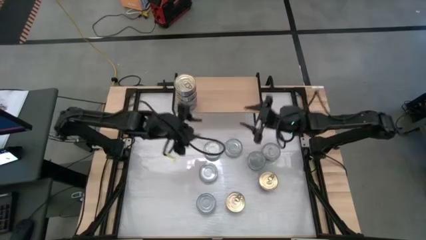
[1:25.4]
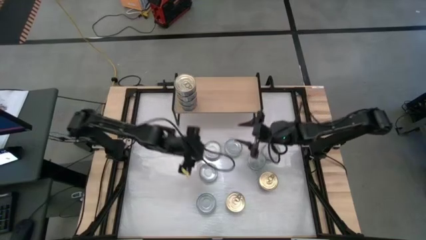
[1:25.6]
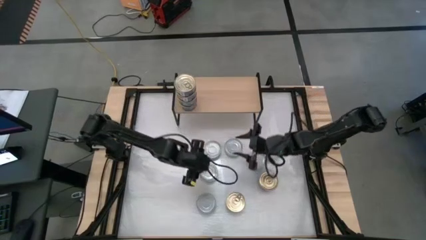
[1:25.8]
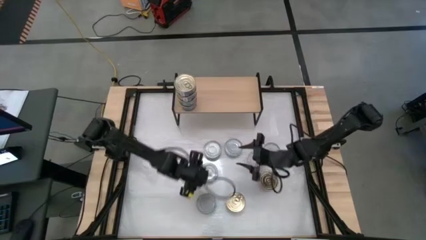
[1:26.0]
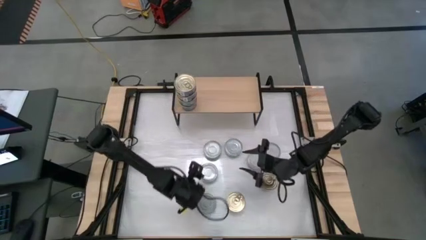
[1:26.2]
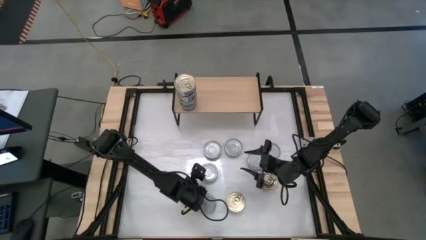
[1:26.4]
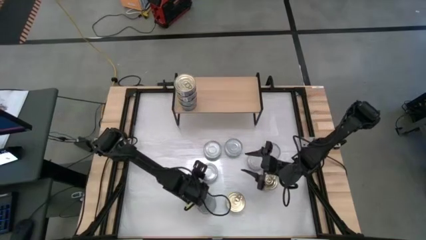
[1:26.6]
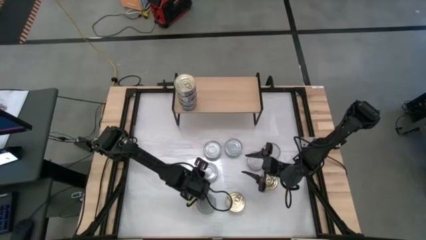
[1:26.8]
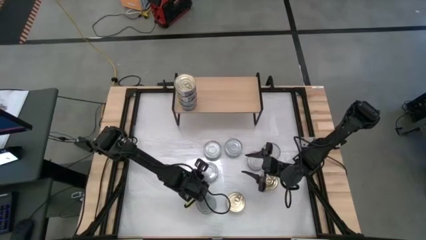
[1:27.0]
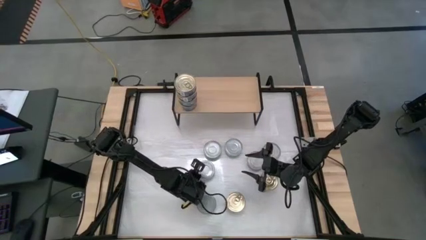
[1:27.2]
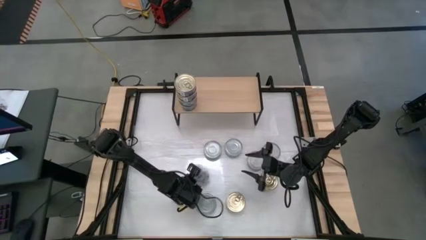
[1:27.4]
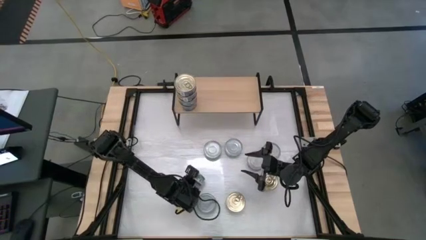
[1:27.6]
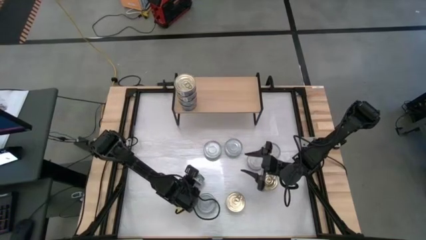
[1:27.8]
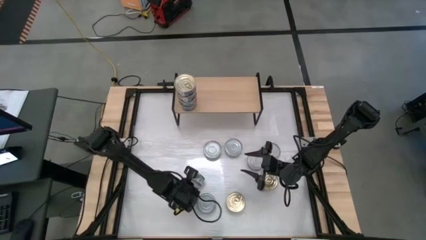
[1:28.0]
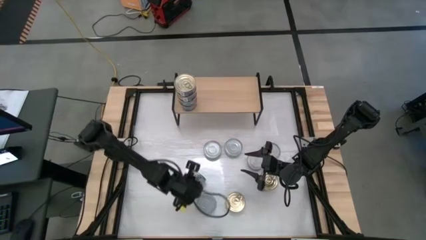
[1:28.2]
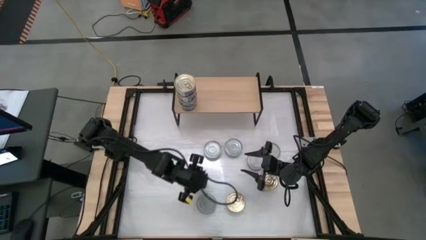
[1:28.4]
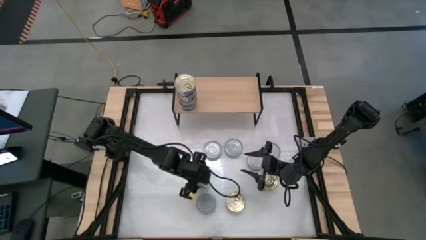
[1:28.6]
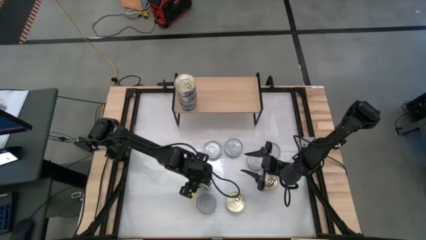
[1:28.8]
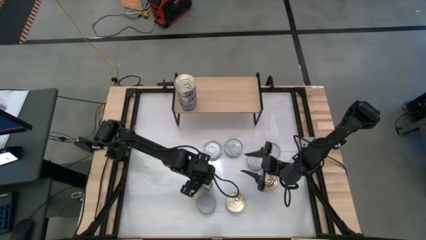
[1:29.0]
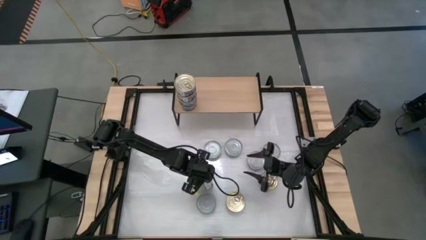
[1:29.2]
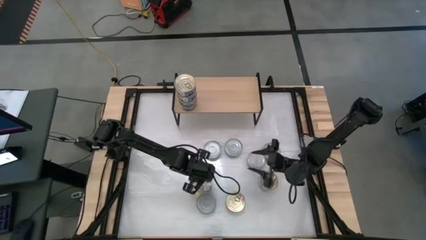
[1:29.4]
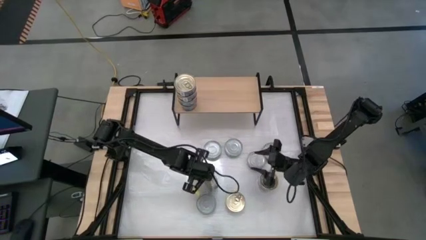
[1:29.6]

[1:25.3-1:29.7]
Task: Stack canned seafood by type on shelf
Put the green tuna can on the shelf

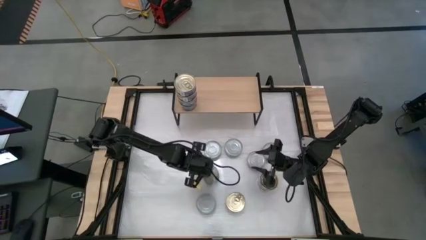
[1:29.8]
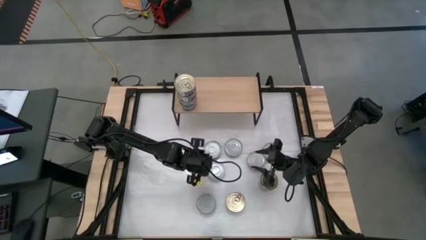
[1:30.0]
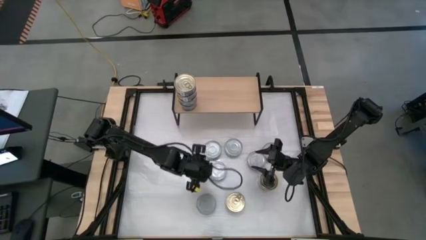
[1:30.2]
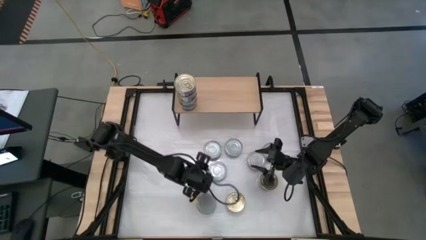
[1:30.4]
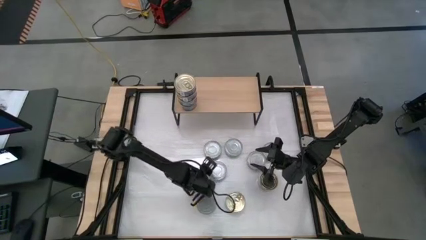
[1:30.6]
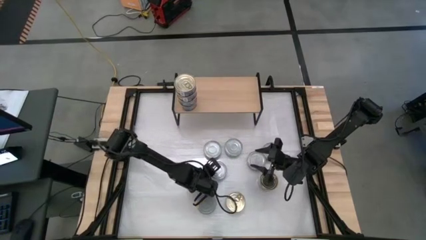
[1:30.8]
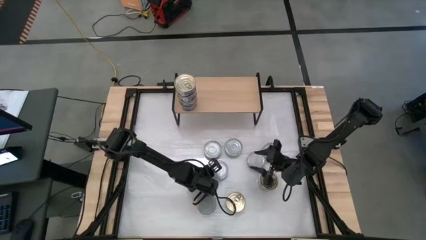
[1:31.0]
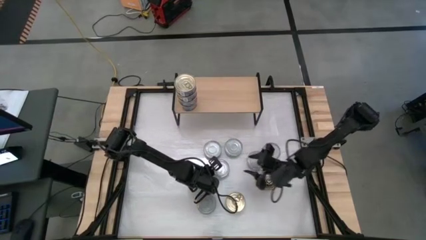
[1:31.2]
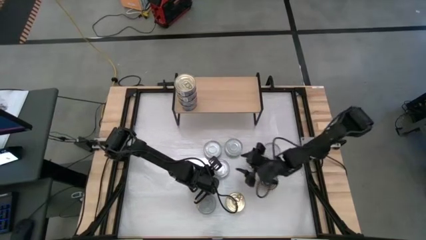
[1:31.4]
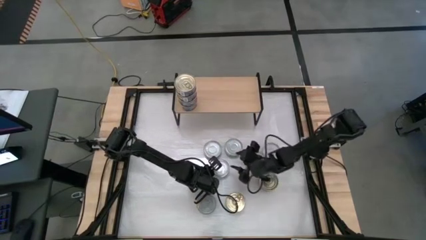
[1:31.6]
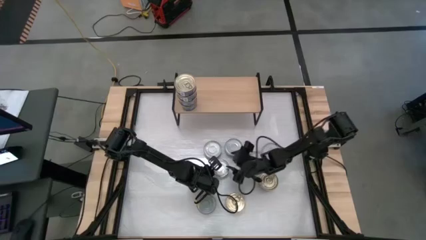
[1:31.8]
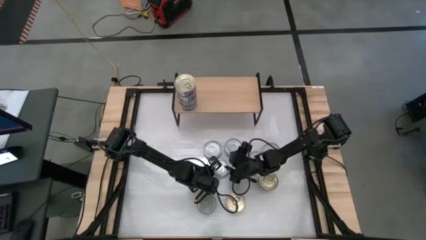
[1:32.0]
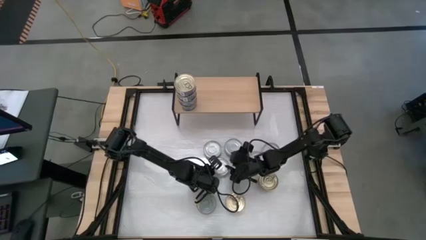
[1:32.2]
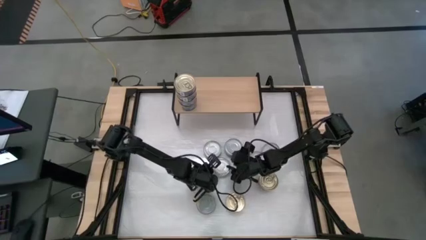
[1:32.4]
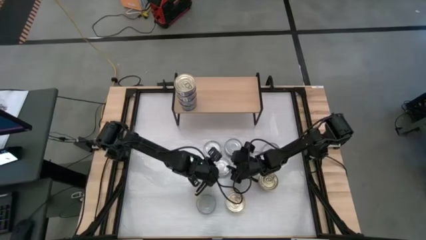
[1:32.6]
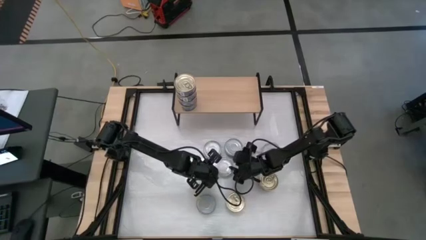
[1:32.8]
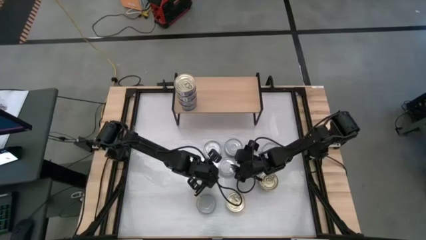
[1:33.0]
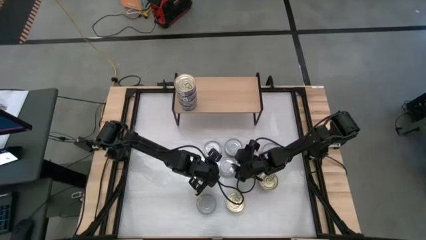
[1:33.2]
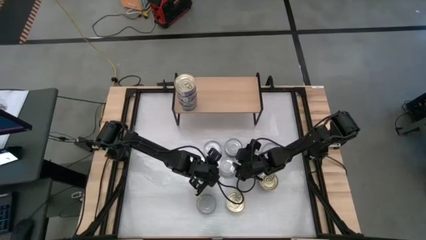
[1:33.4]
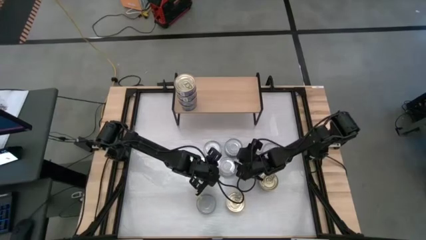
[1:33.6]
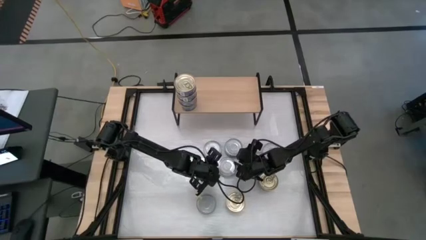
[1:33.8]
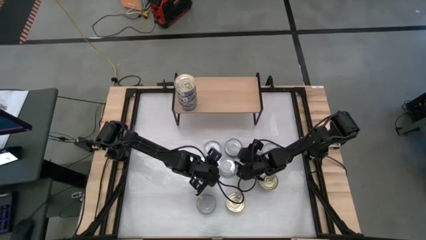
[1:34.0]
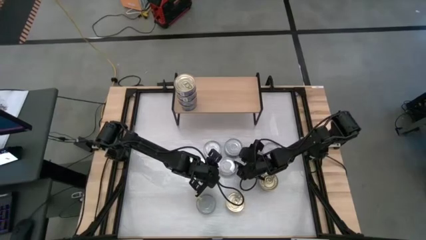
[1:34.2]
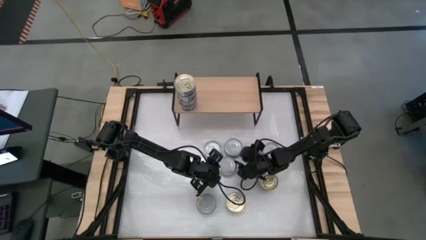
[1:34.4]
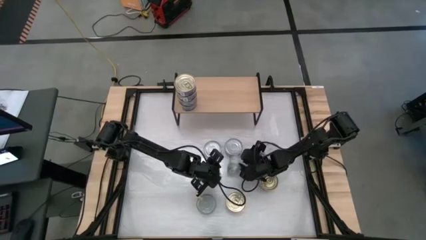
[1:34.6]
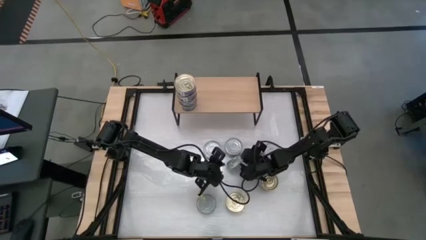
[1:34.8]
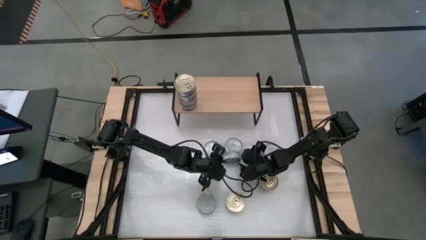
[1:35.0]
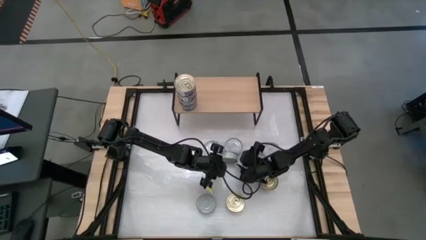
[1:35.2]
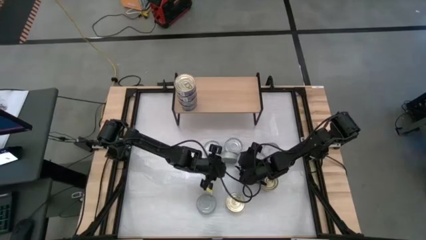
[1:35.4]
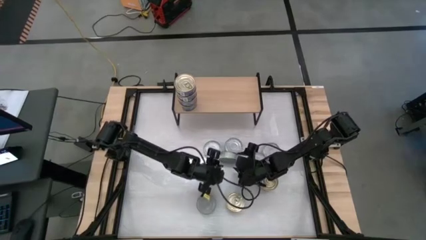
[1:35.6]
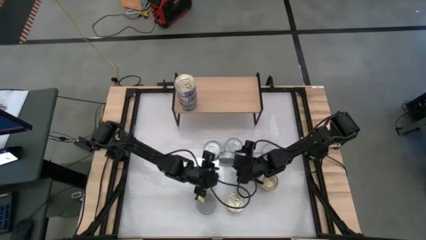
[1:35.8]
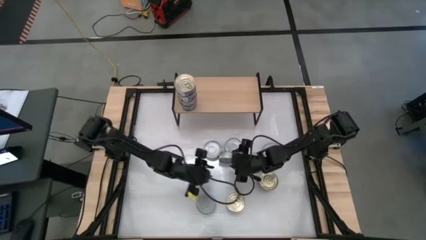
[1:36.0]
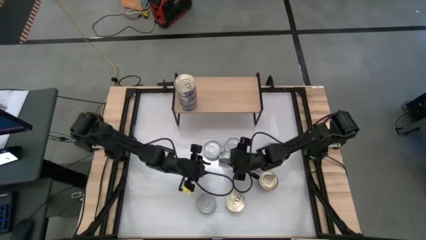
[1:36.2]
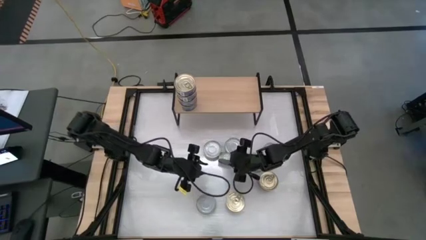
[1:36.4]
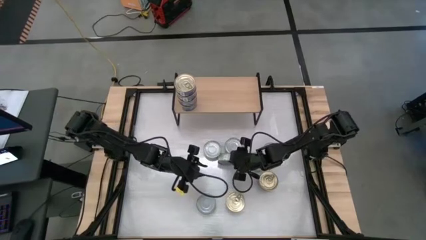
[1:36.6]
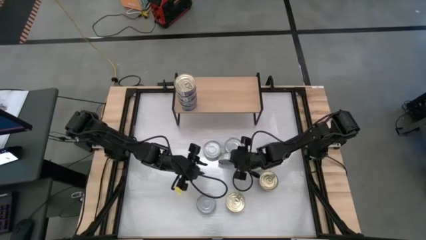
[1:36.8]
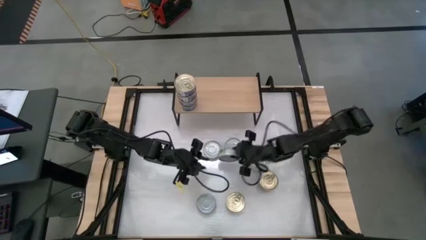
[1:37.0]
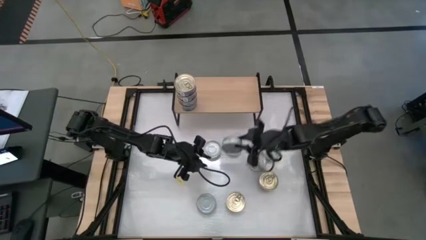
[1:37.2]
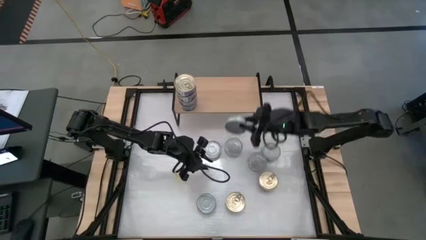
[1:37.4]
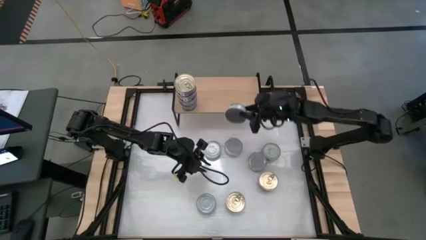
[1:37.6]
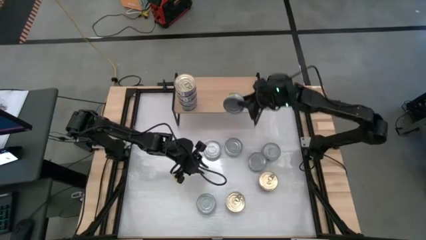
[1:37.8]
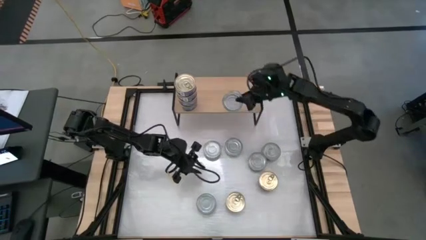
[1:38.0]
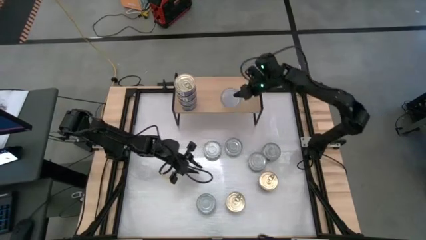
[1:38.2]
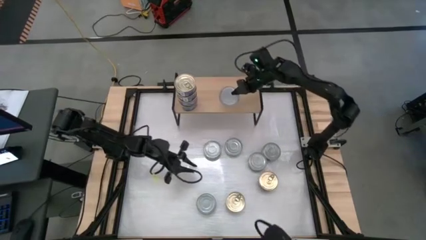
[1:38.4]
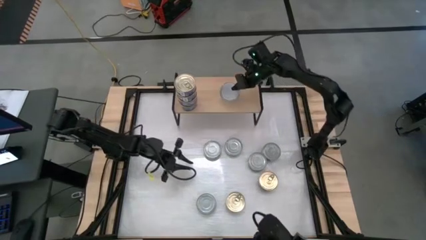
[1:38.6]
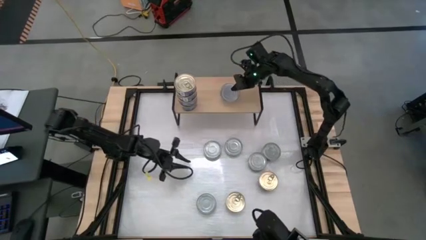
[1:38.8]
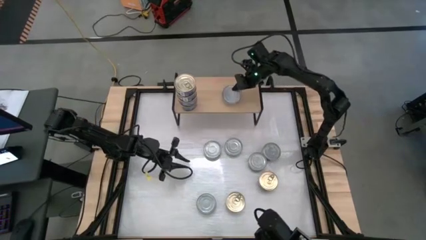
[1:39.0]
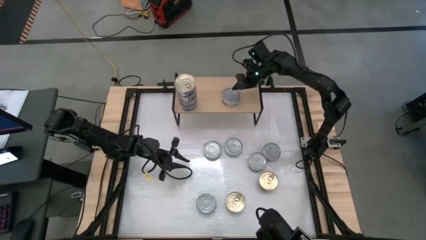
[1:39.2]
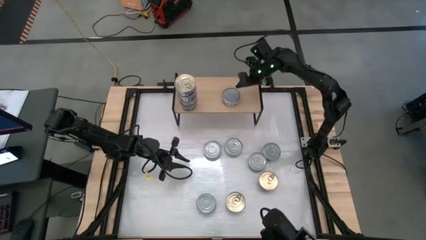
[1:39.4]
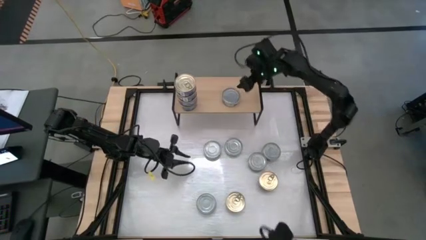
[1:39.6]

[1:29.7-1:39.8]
Put the green tuna can on the shelf

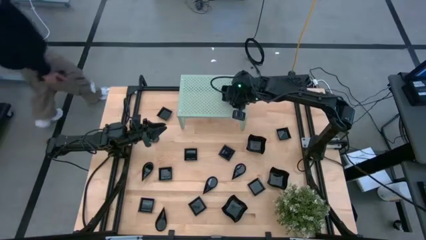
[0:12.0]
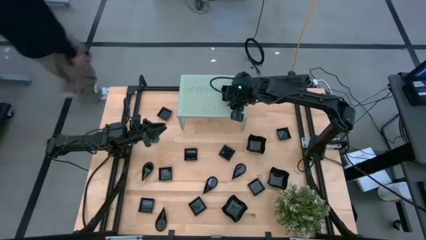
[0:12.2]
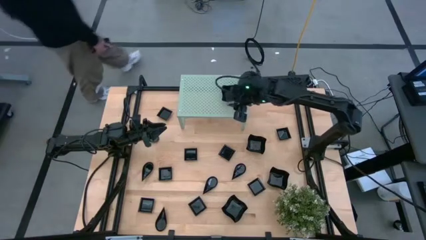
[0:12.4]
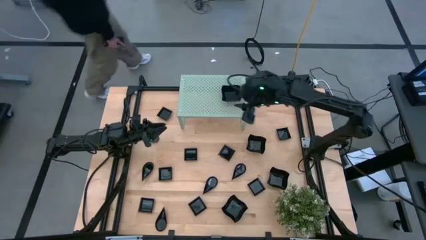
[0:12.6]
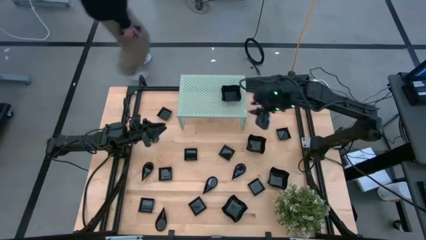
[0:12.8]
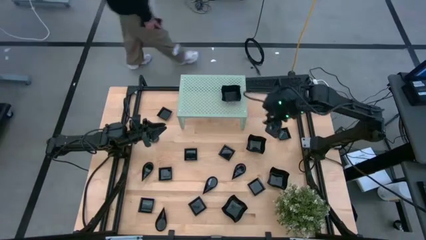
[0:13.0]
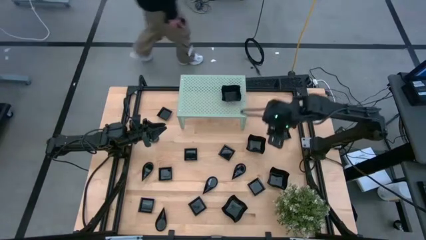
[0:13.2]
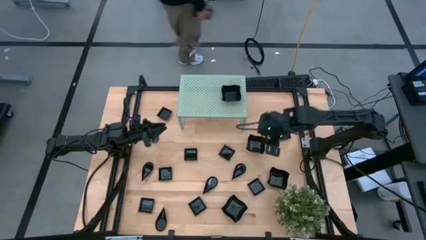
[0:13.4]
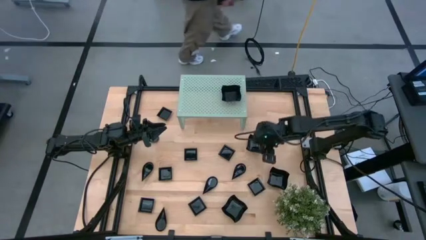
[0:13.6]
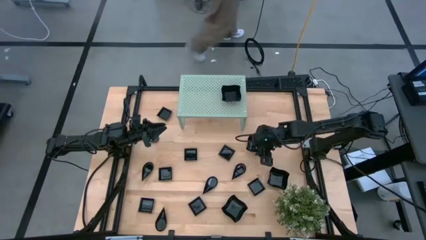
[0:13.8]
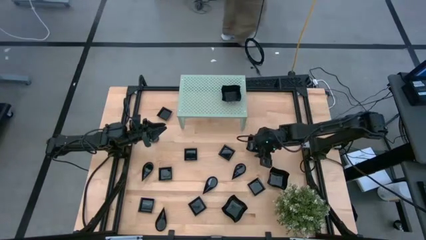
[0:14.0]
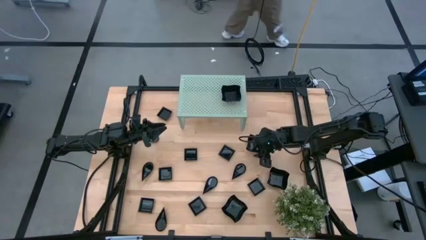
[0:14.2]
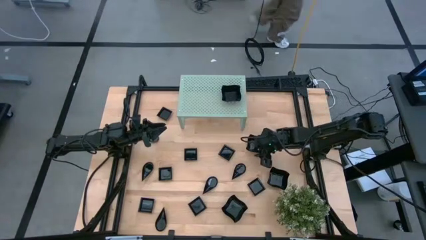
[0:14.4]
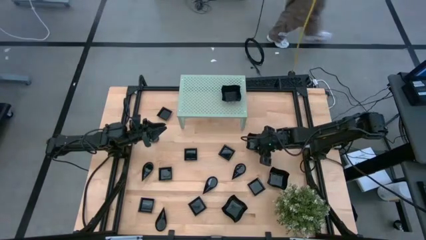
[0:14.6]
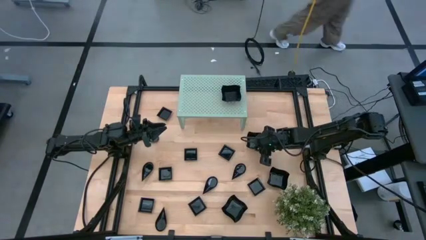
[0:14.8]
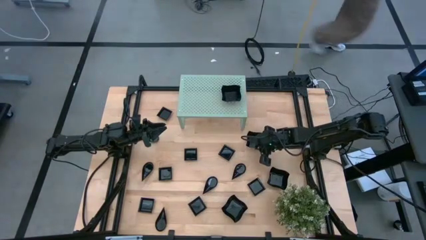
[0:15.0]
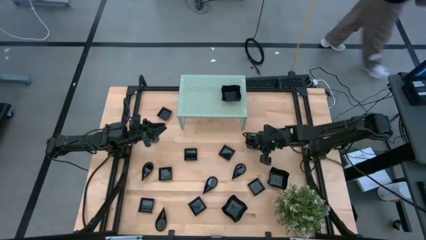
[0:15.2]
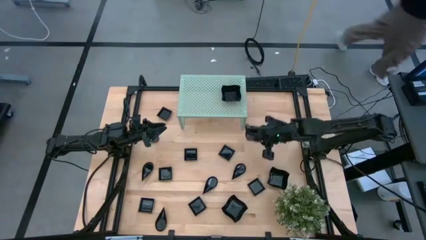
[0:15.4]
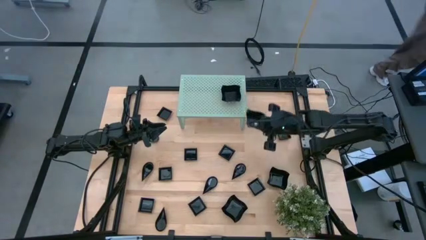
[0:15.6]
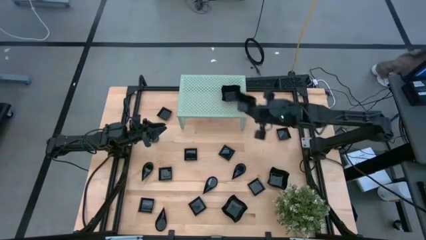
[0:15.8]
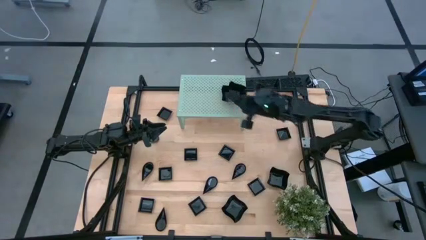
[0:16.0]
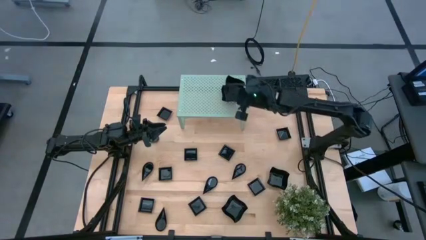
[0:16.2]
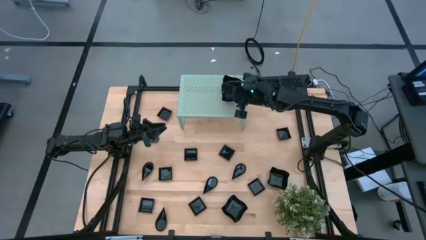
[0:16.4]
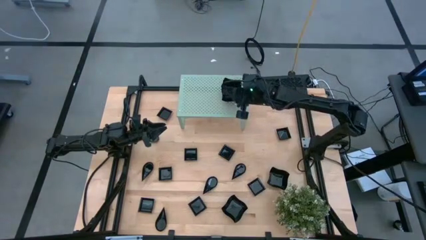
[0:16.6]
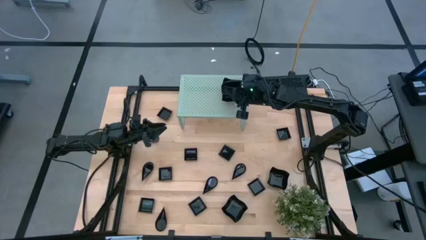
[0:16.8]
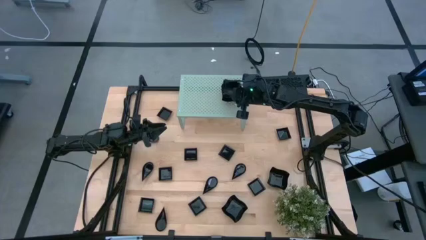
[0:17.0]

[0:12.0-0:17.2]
Task: Pick & Place Mini shaped plates
Stack the black distorted square plate on top of the other black distorted square plate on the shelf
